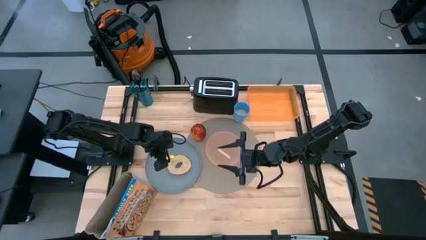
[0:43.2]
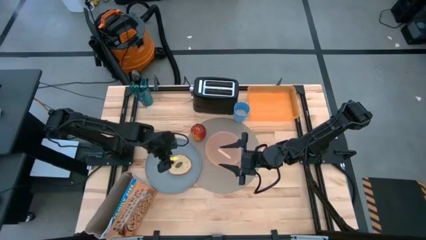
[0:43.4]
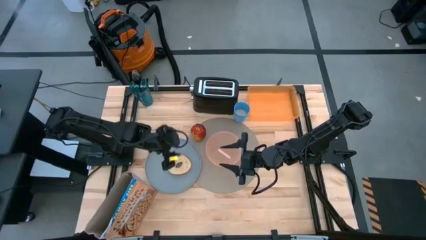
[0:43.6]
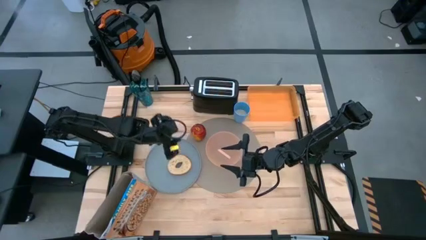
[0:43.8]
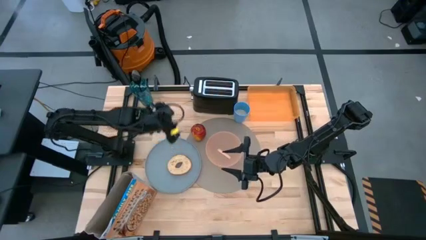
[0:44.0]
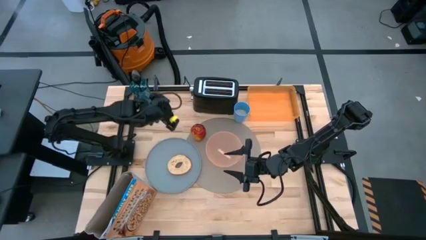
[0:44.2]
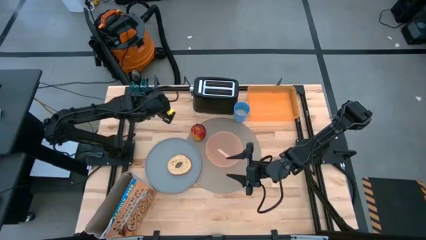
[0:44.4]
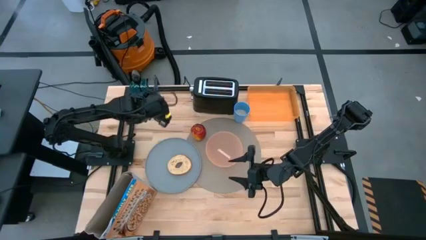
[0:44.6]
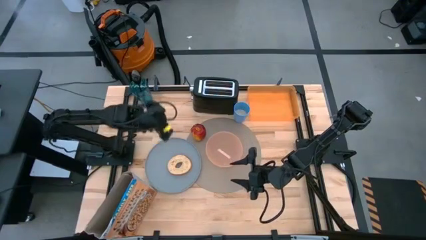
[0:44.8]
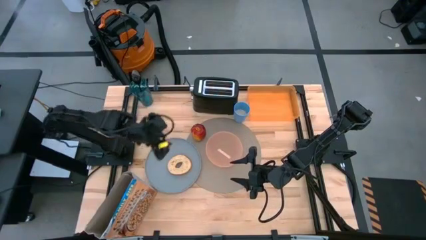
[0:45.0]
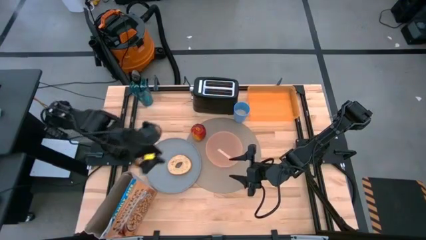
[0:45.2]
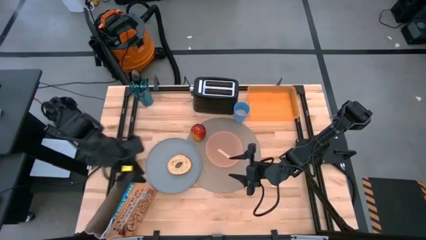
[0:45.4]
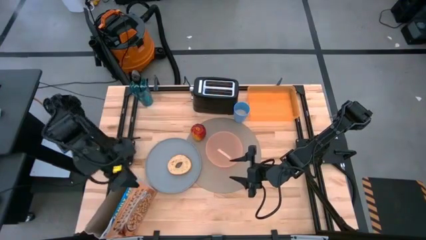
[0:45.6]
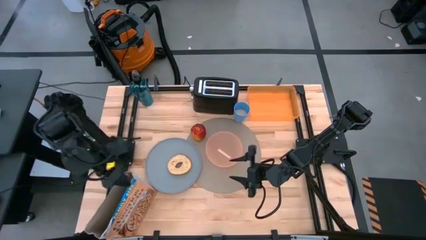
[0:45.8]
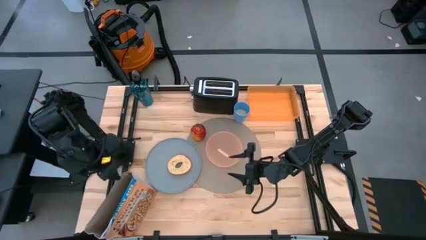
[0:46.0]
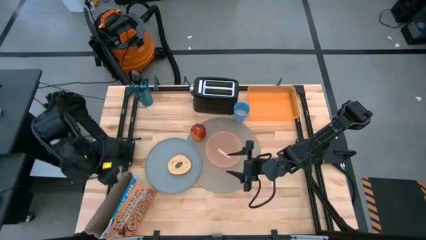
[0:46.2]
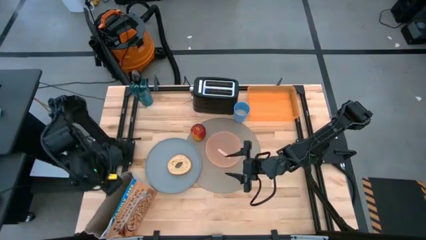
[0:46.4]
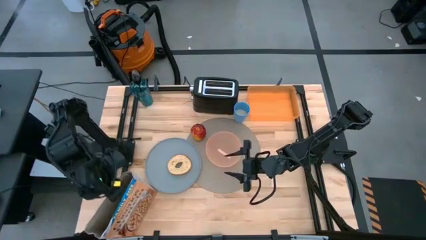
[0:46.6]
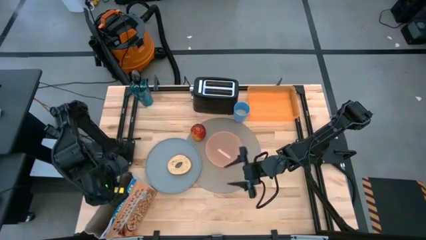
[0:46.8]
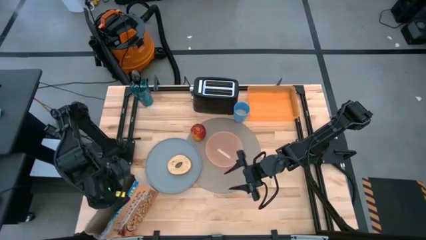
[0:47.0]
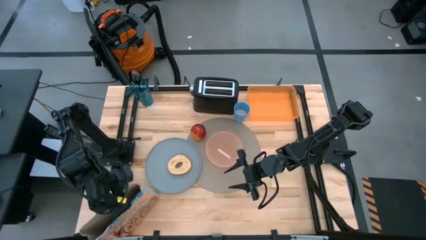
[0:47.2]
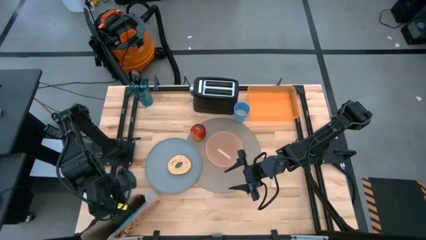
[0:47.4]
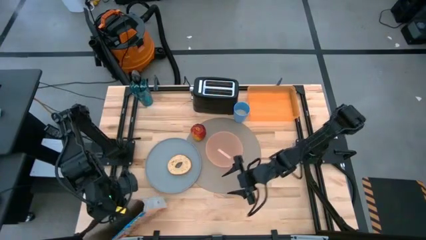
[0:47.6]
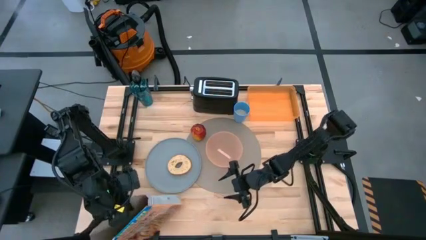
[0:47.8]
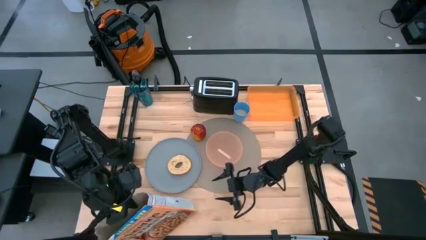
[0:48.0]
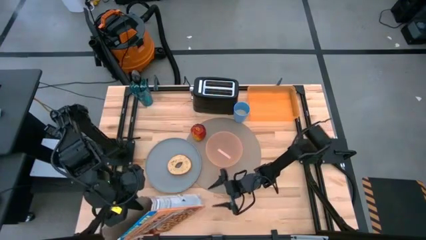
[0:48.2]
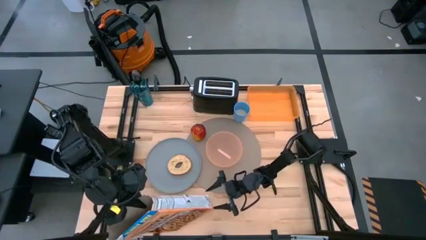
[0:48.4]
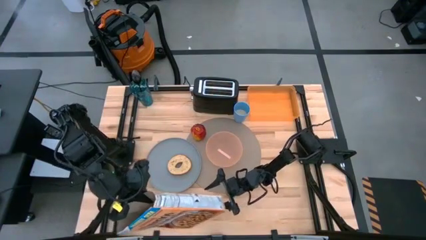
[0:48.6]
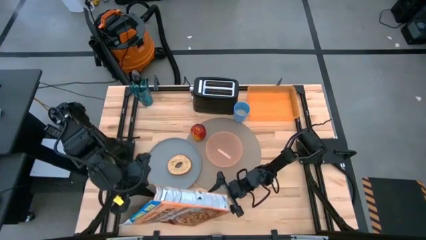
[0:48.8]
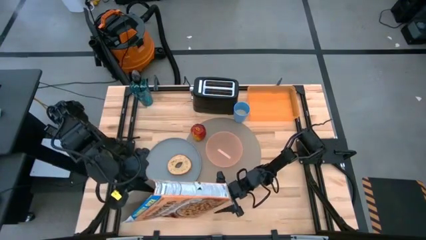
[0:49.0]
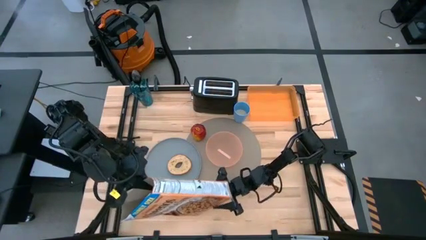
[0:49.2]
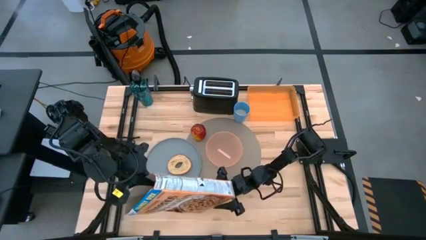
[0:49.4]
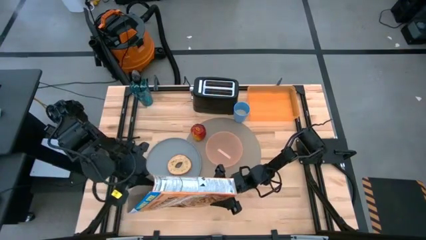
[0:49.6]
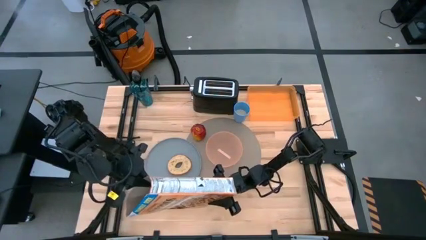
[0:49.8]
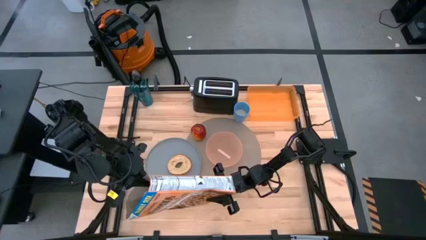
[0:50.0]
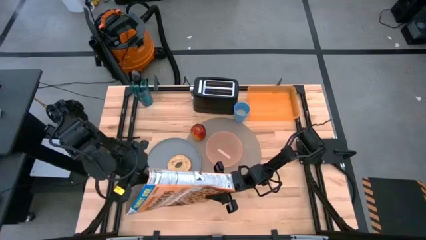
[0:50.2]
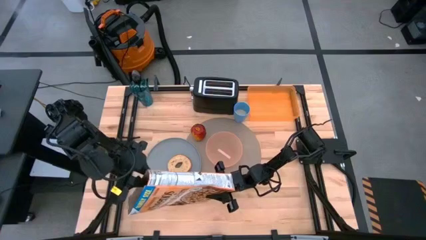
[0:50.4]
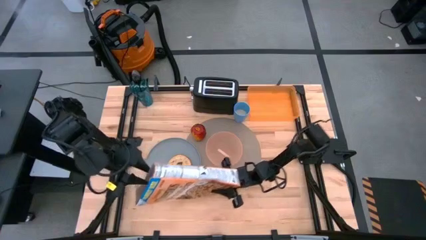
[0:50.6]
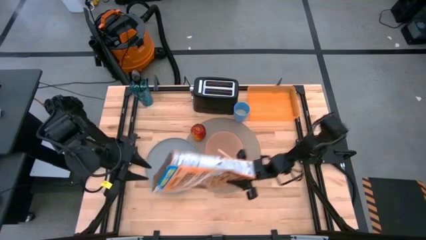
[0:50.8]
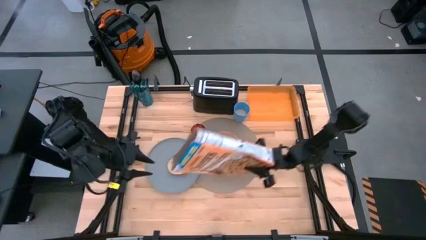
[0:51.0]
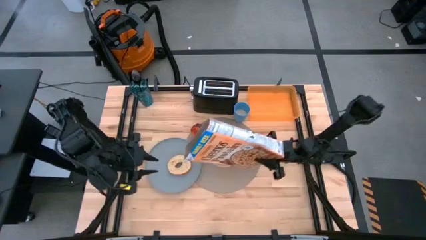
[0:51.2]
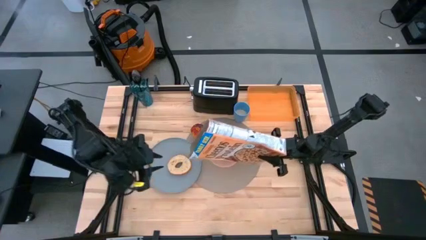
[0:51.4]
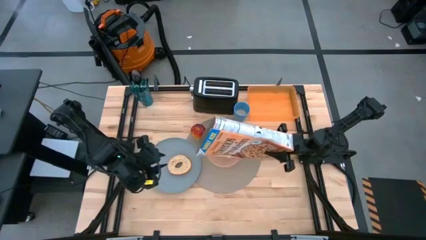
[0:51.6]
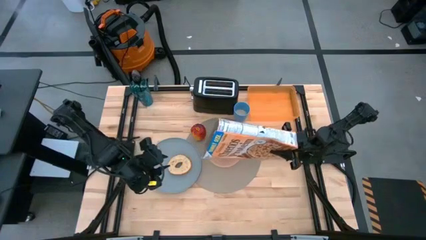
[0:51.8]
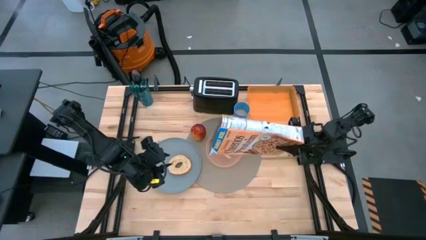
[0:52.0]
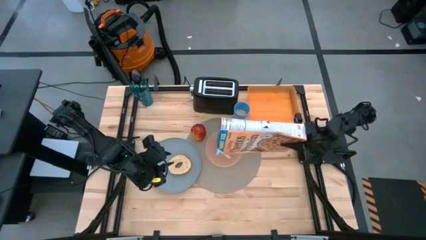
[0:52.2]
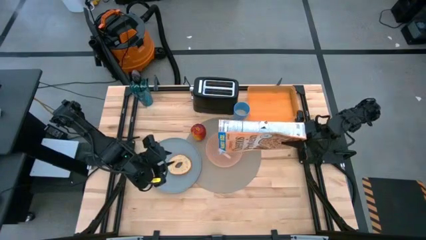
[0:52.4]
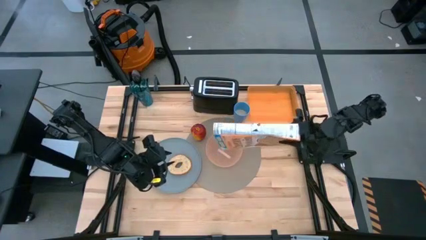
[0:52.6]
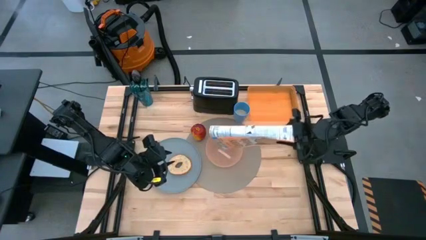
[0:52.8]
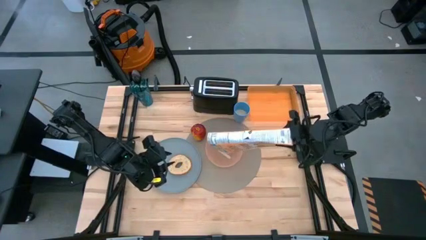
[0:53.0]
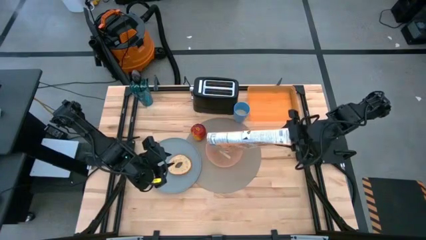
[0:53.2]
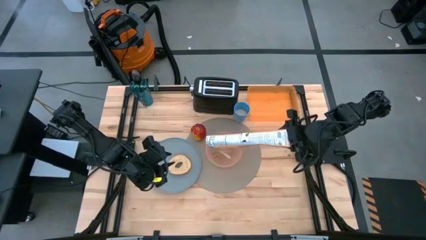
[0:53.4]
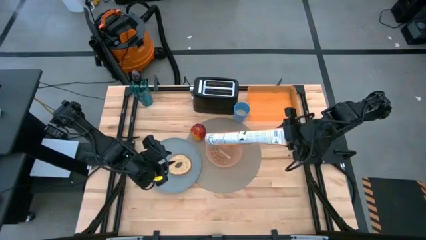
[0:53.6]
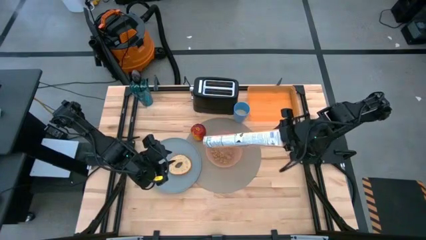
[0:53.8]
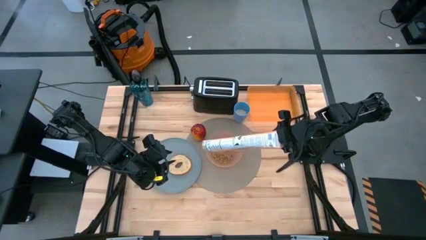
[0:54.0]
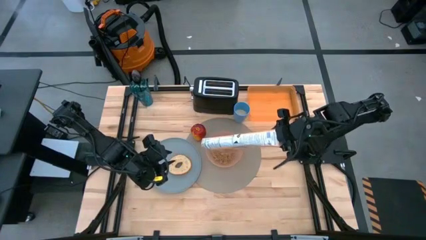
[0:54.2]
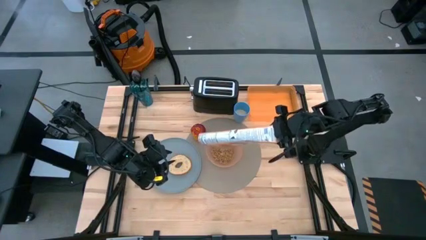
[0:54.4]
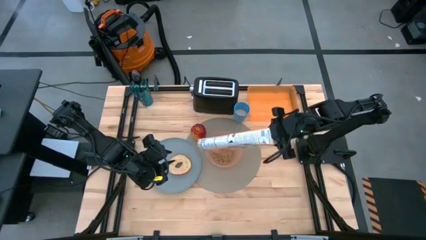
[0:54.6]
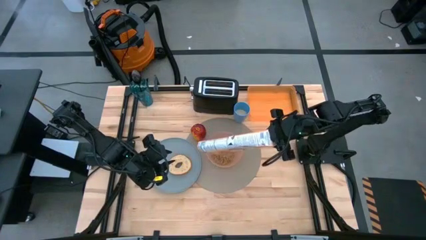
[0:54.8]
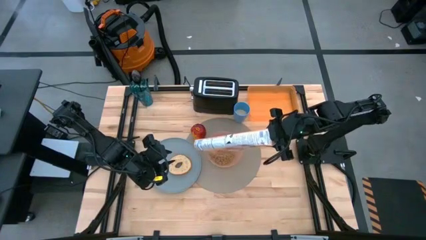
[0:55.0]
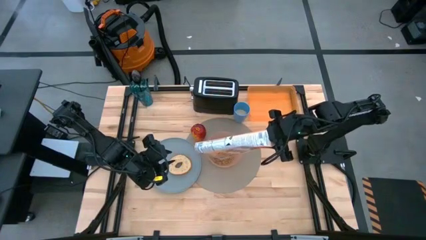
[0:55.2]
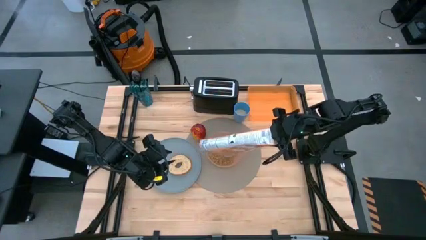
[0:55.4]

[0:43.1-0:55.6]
Task: Arrange a breakfast setting
Pour the cereal from the cereal box into the orange bowl
